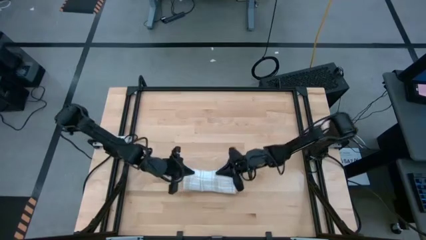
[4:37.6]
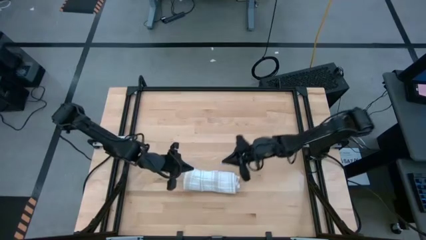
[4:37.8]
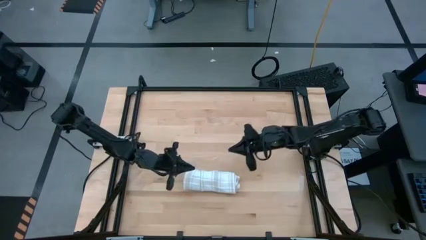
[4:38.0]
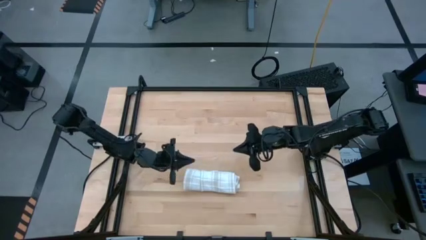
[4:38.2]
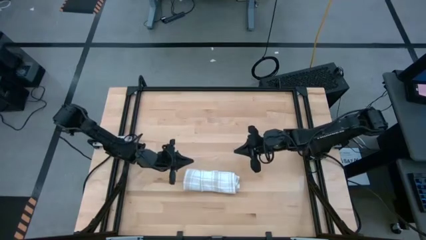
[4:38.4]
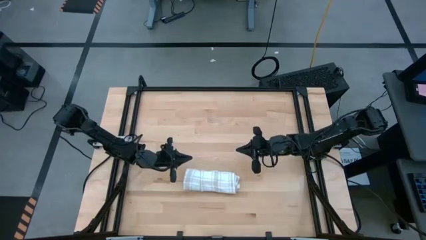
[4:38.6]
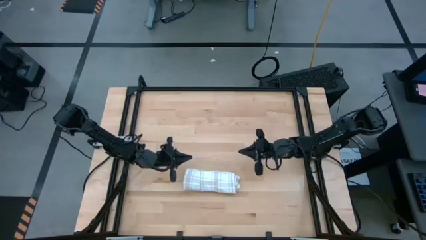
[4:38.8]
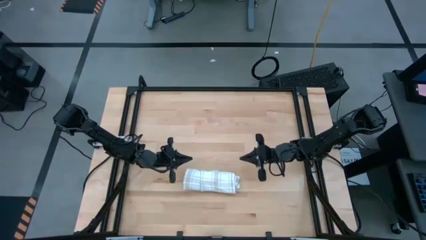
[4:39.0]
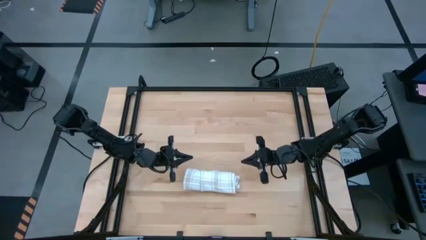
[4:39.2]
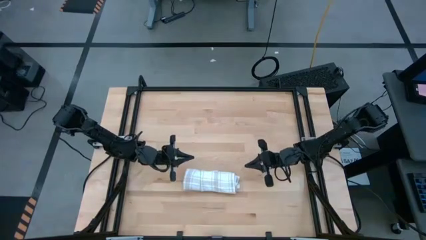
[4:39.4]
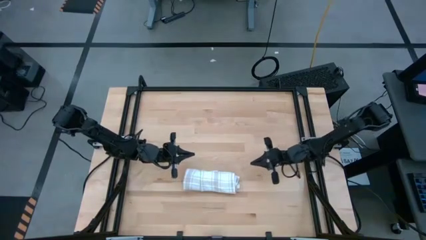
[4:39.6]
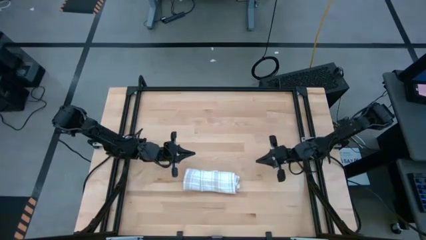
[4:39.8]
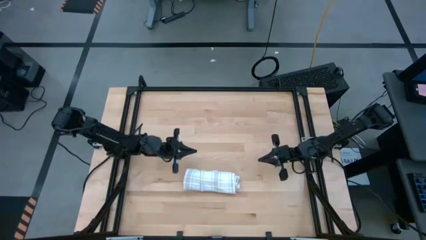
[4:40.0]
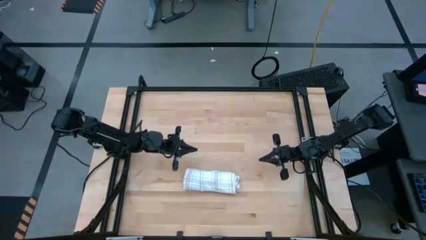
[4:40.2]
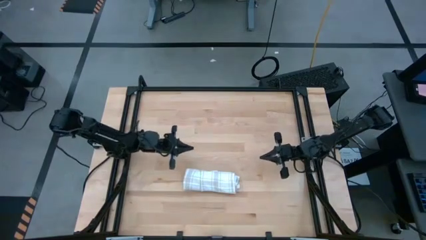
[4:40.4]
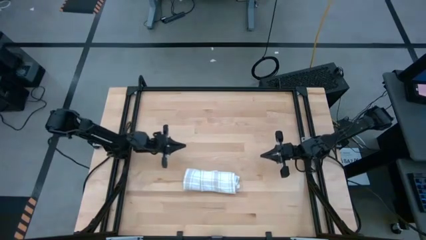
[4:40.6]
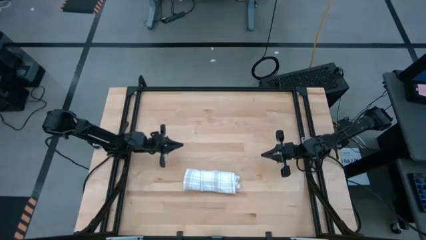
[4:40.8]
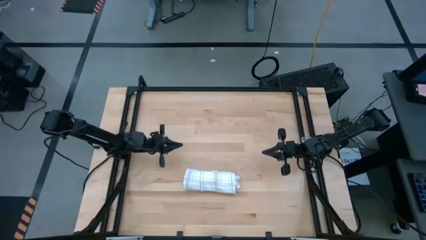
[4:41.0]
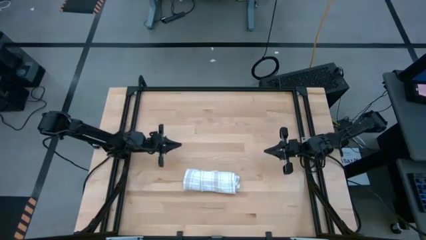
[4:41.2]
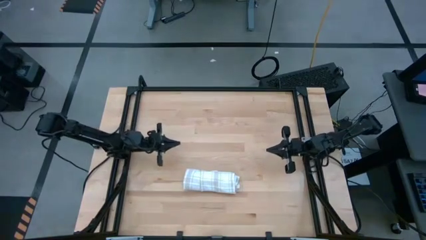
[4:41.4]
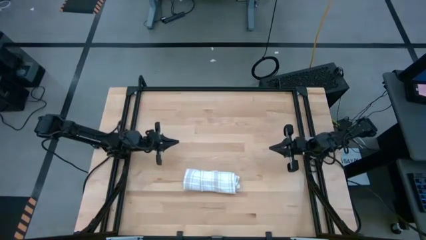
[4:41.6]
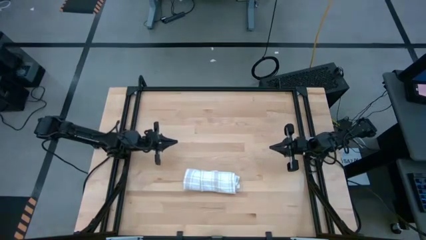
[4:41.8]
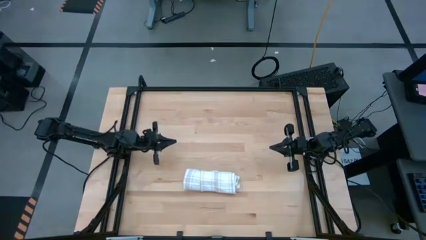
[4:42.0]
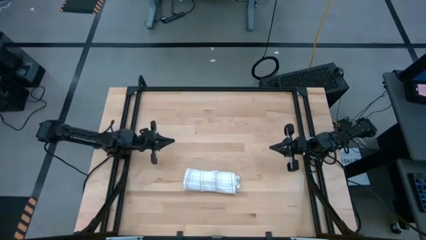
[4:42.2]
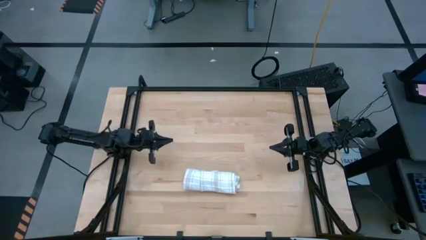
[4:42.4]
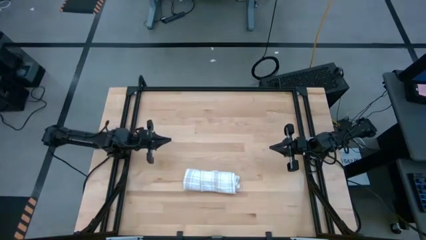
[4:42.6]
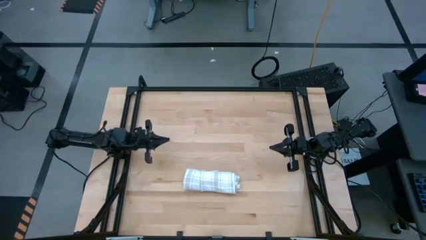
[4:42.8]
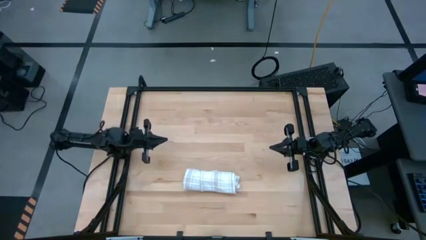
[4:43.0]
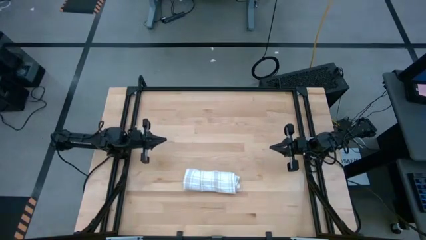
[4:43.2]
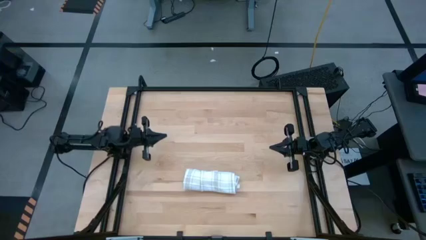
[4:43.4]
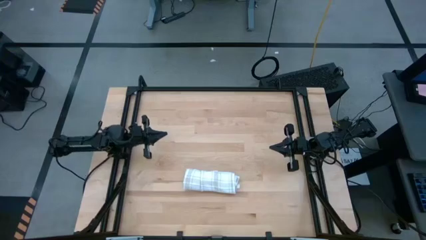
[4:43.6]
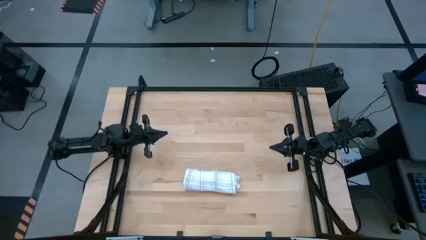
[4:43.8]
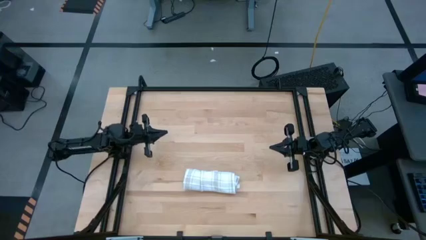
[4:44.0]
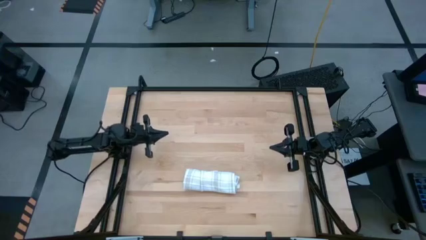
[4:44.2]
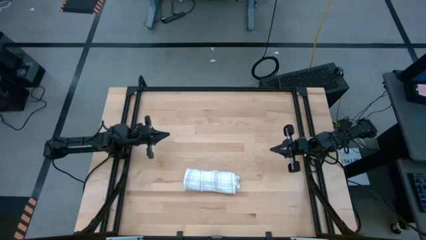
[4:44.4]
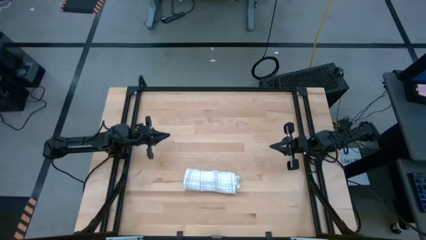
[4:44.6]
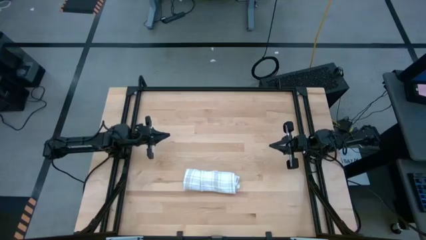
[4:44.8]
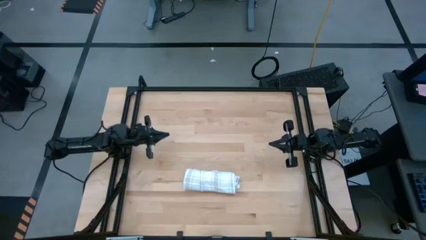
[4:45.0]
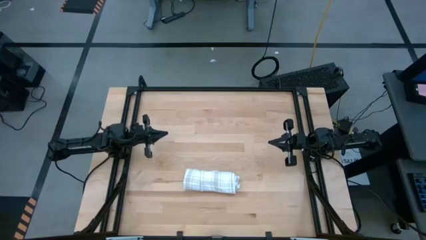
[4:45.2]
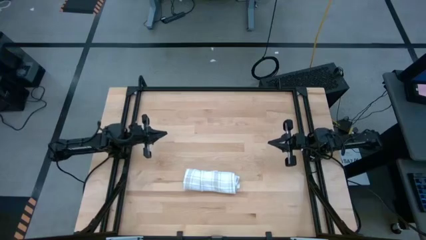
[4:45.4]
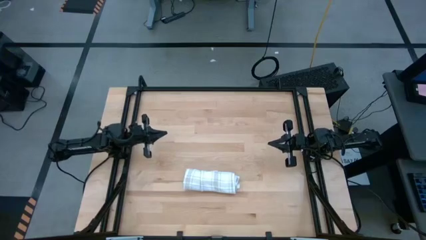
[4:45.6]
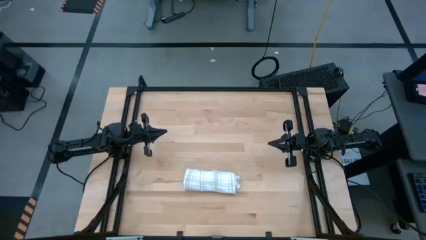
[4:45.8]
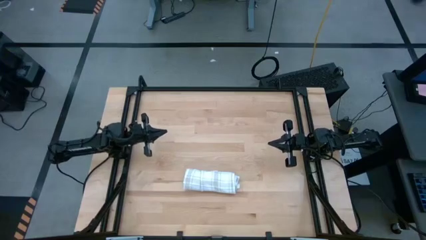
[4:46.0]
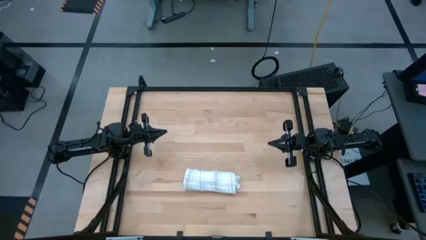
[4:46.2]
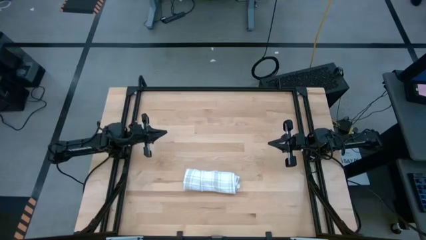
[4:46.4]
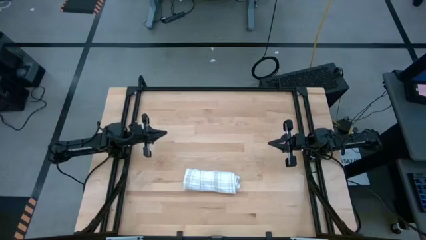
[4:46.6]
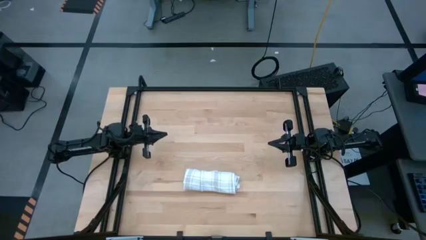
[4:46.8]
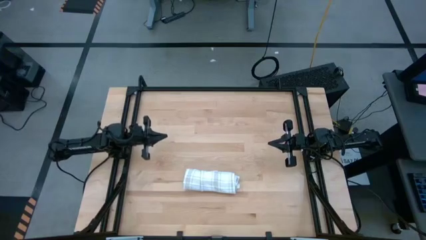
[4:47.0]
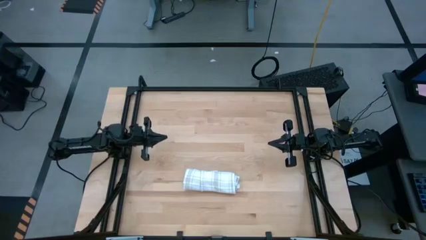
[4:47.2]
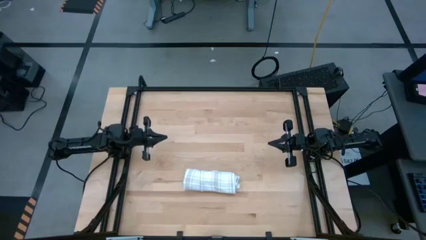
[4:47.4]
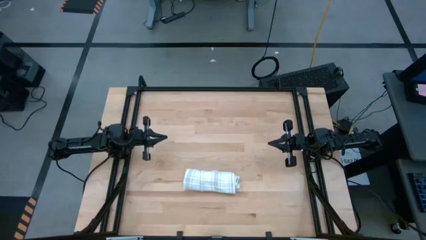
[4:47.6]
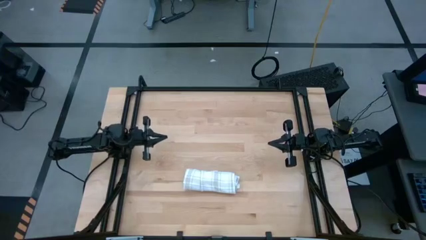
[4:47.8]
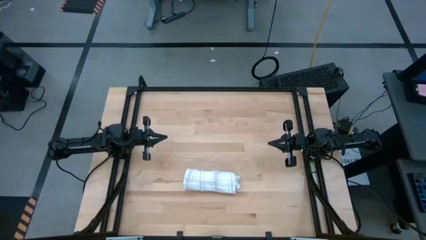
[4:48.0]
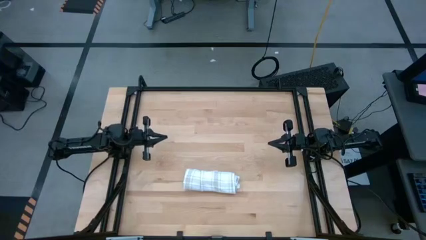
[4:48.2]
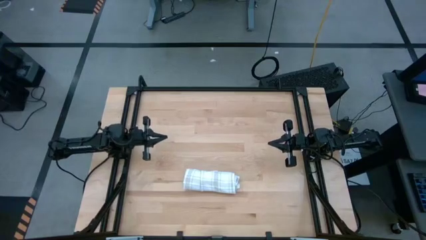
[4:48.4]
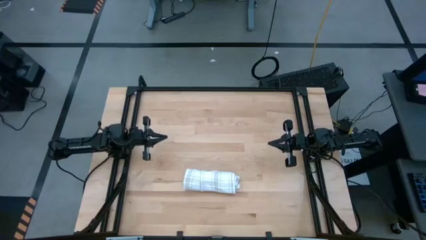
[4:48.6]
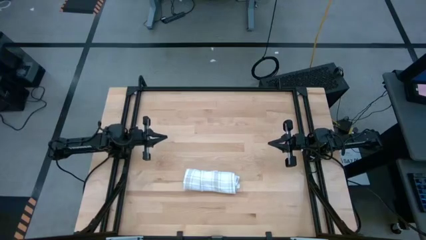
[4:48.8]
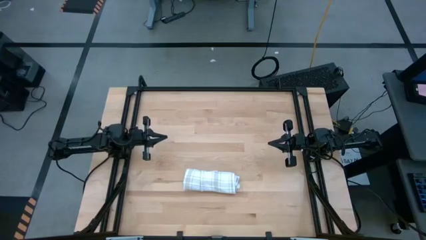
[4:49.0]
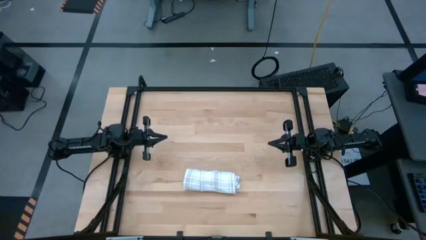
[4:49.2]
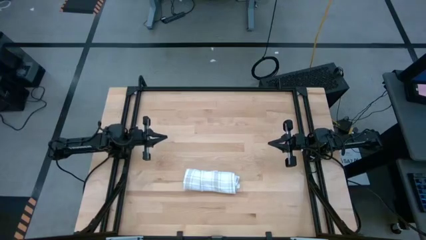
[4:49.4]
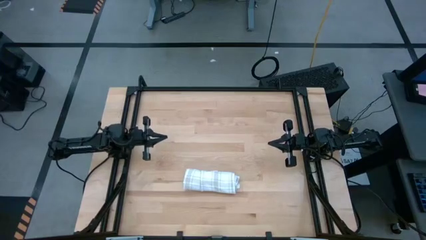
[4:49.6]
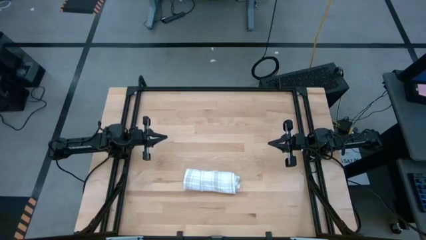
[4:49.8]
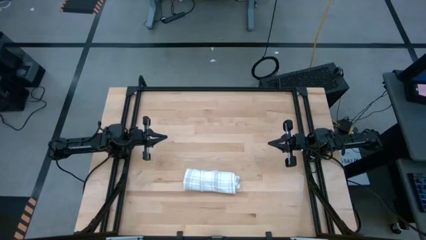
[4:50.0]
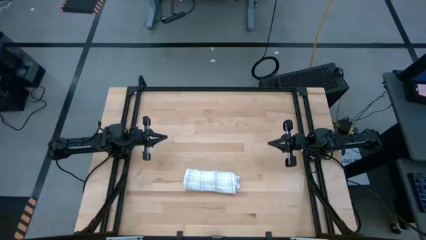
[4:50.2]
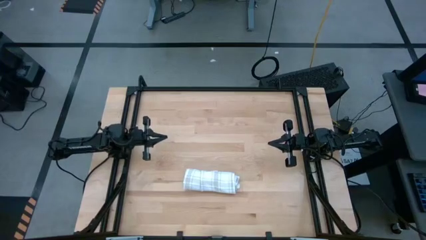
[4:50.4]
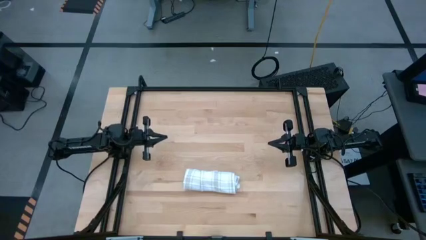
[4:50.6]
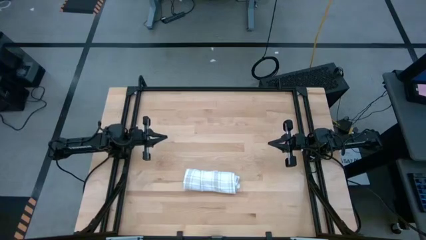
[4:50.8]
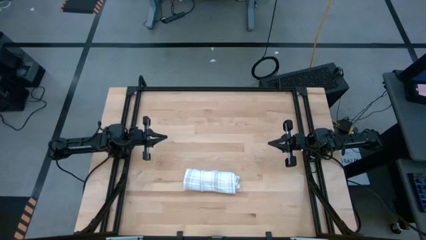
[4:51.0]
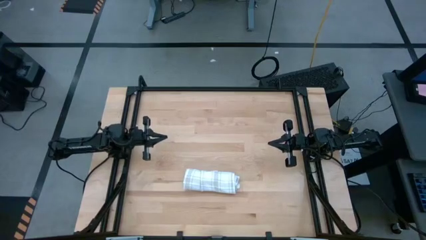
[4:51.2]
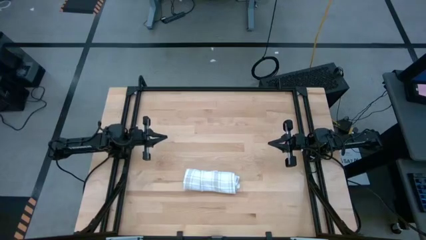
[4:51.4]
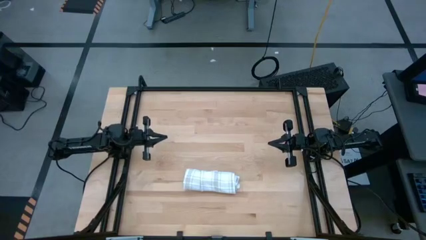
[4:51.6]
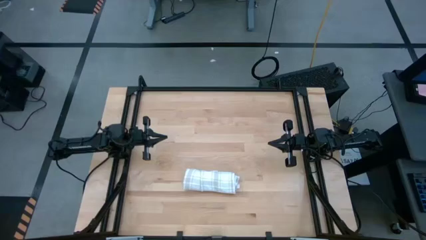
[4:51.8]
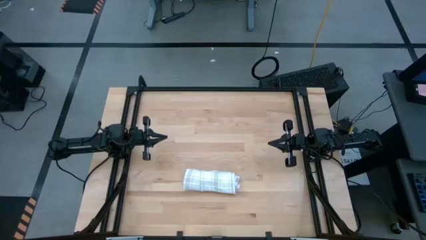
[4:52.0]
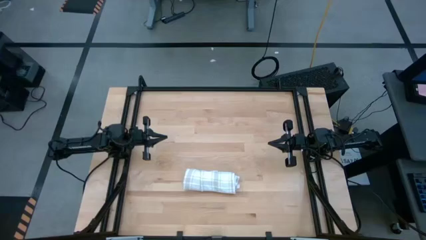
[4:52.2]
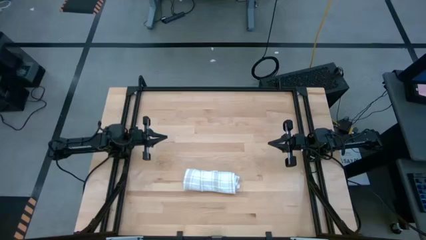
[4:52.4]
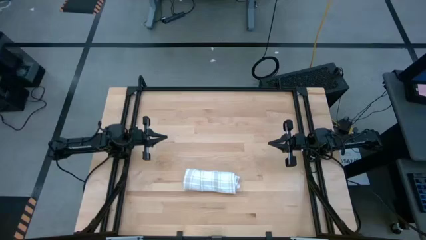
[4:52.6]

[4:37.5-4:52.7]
Task: Roll towel into tight, uniform cylinder
Return to Home Position
